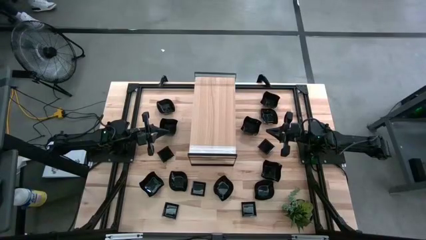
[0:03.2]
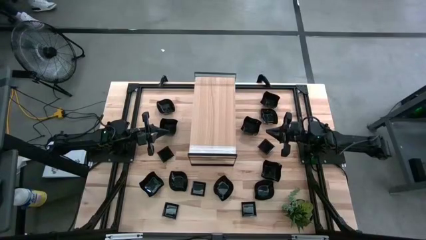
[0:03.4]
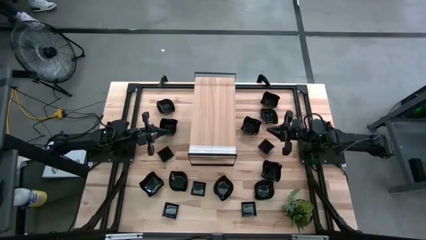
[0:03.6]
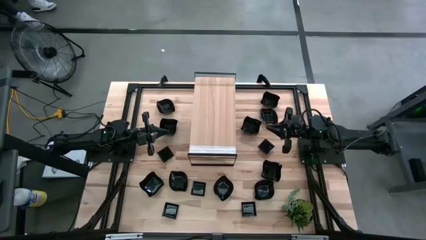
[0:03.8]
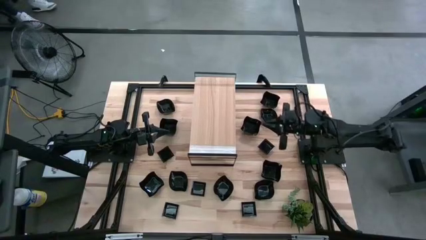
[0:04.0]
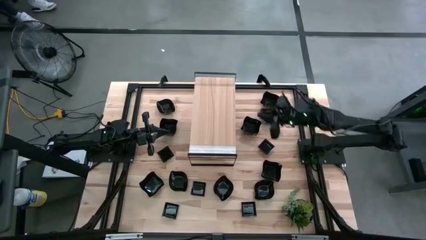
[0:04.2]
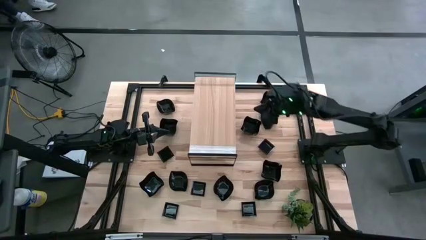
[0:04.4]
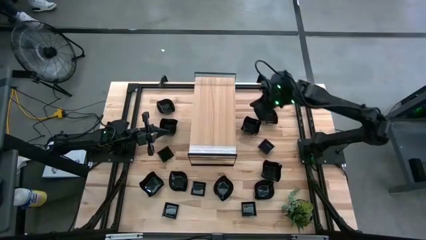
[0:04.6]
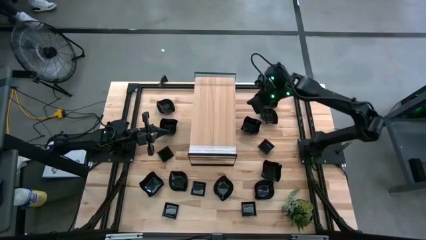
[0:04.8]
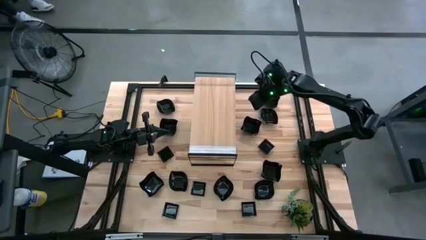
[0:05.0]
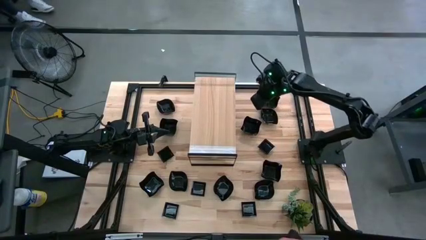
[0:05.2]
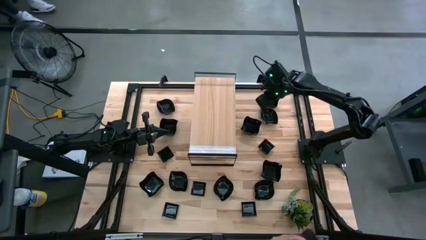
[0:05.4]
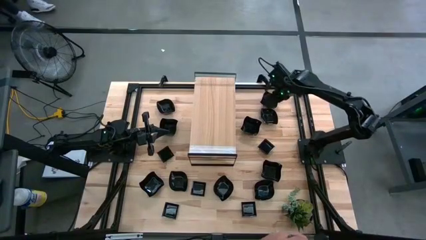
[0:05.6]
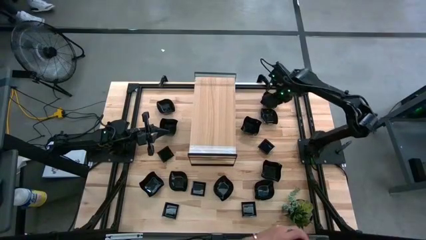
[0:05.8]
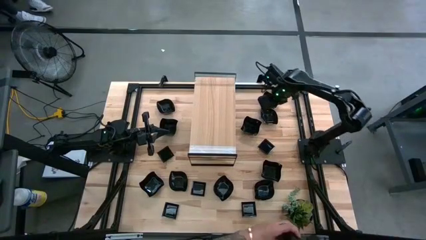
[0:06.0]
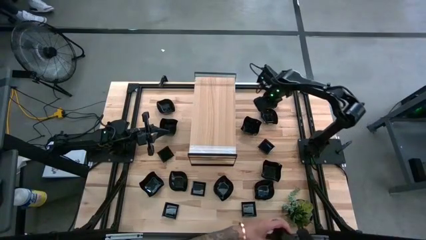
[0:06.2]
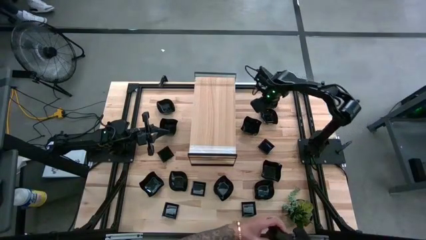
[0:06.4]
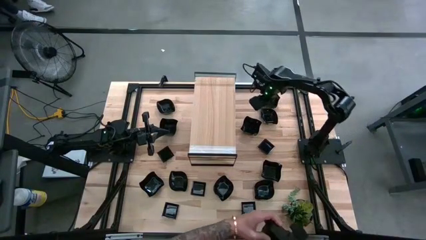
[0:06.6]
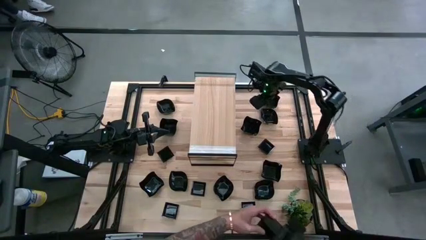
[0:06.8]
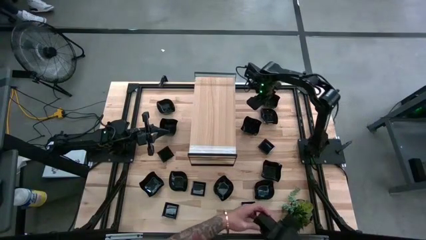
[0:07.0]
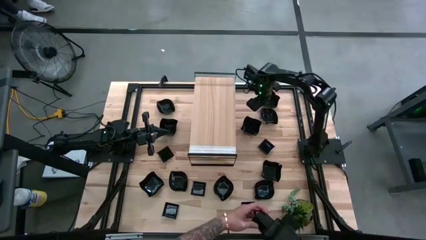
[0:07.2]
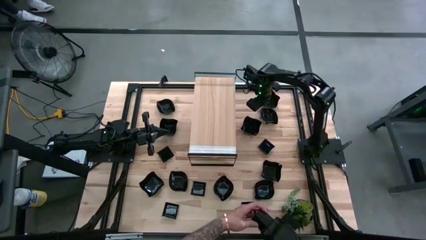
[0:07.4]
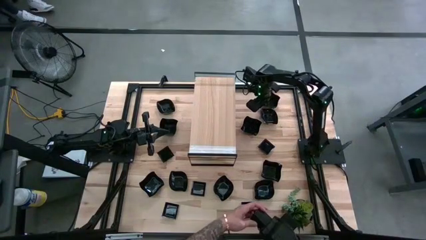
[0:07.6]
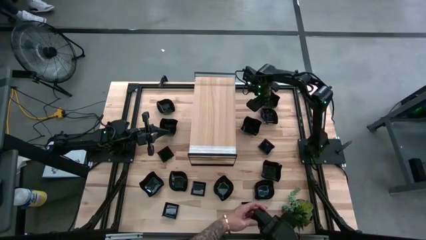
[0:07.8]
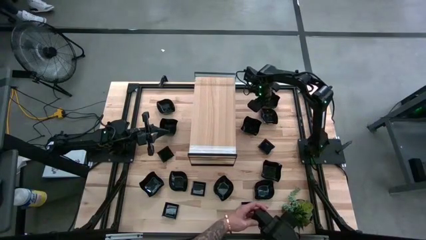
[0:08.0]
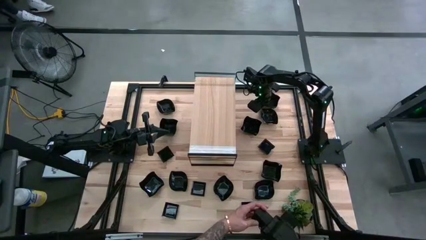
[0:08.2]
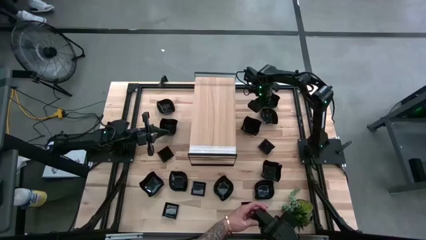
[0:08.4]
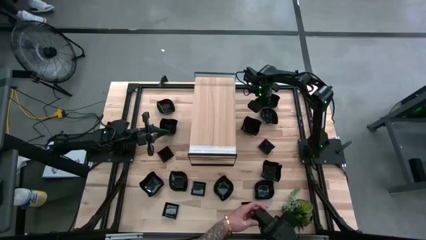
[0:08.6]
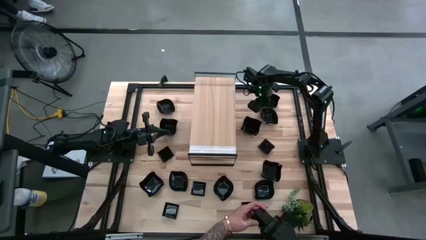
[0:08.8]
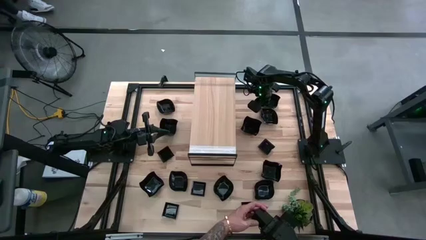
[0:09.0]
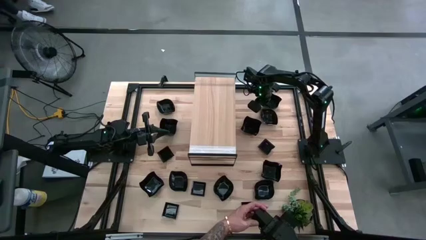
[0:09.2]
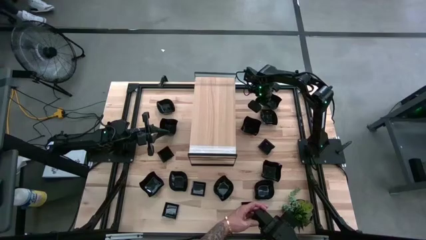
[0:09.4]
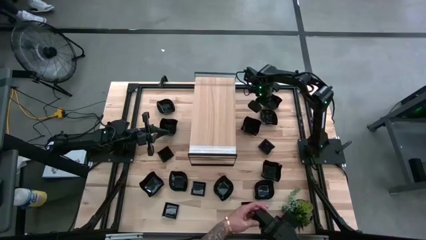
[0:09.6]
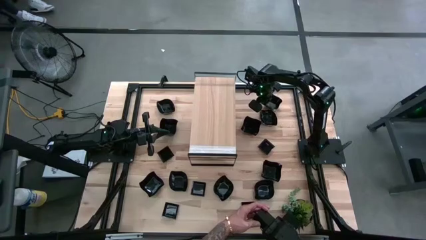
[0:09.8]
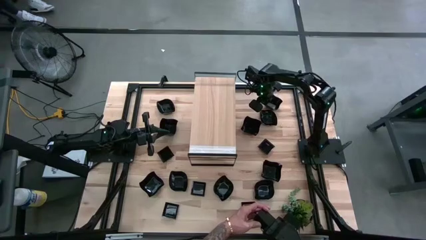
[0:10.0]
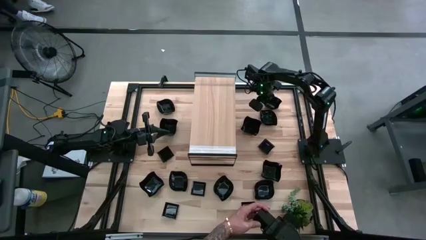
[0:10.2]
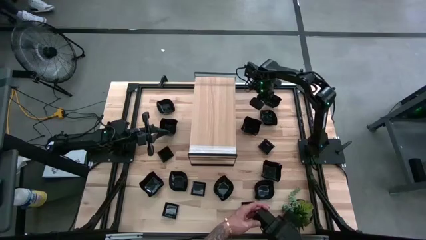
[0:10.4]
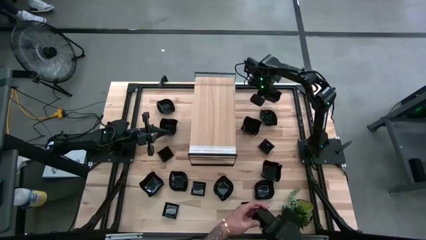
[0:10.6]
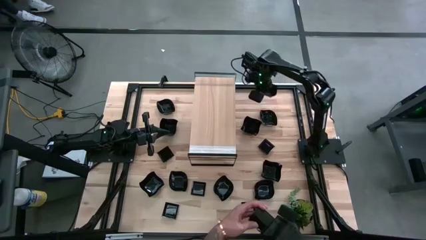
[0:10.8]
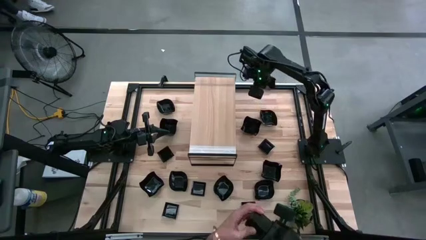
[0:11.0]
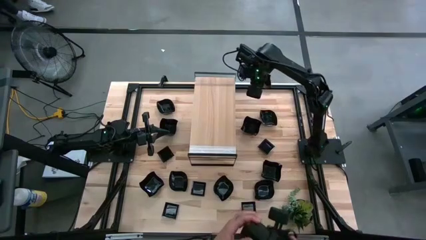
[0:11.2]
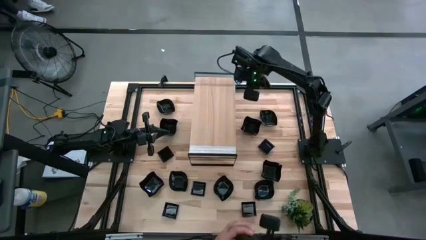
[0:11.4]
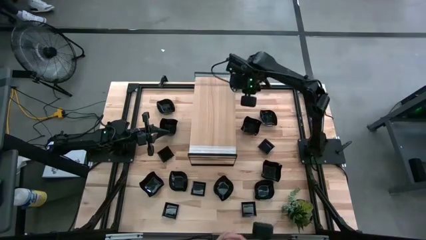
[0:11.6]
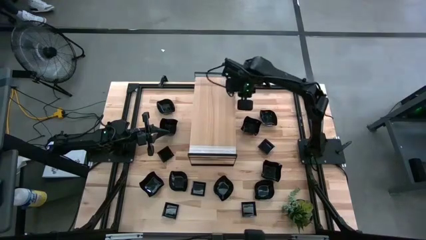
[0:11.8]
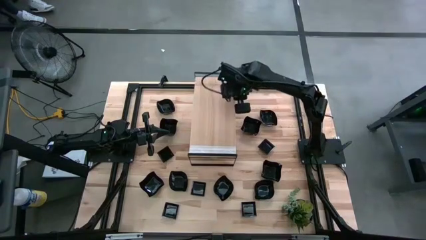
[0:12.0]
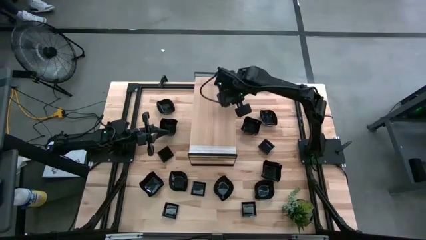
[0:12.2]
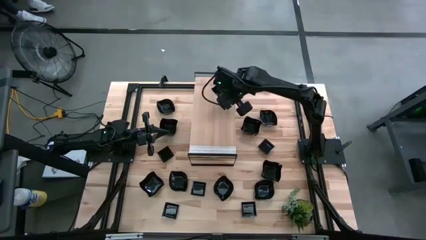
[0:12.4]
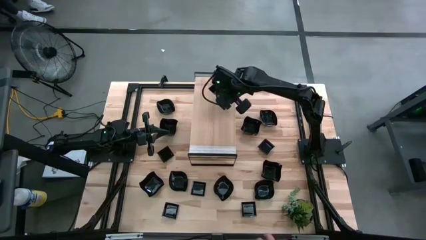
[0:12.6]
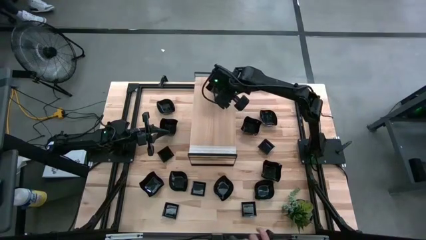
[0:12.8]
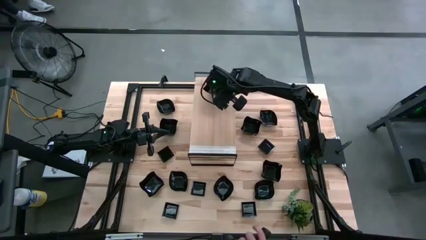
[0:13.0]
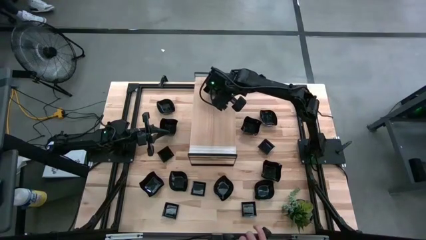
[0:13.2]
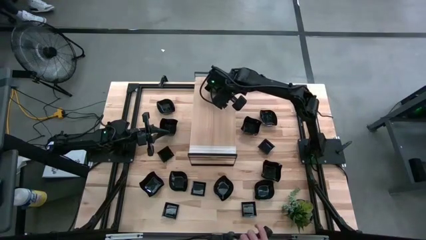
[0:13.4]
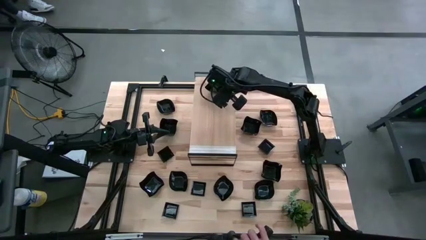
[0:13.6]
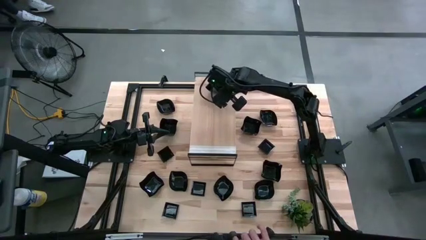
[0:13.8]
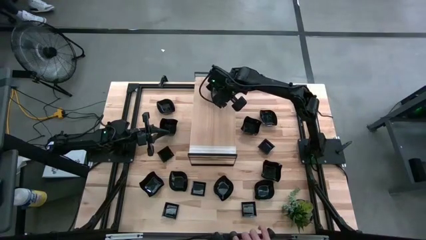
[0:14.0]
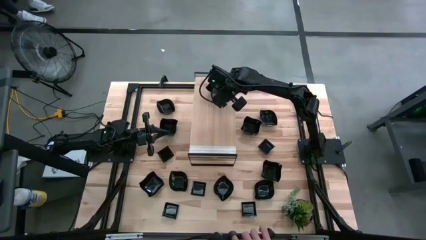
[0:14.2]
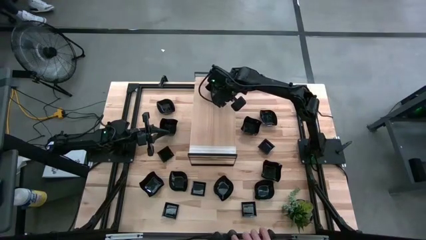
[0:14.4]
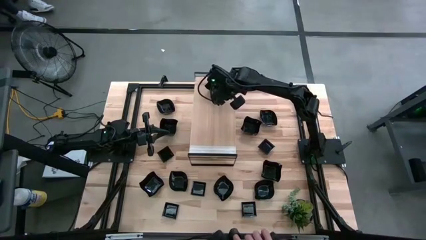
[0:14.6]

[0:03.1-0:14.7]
Task: Pick & Place Mini shaped plates
Put the distorted square plate on the shelf

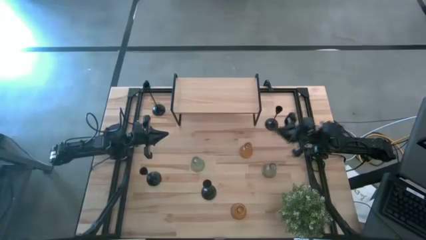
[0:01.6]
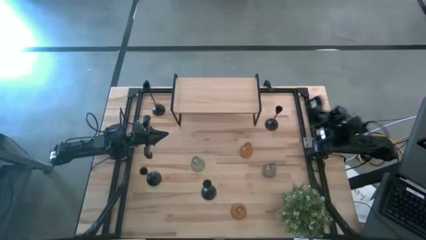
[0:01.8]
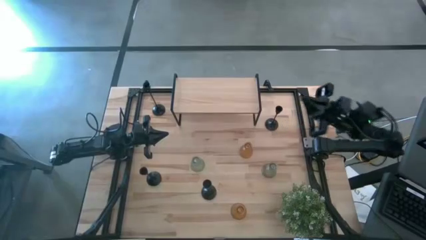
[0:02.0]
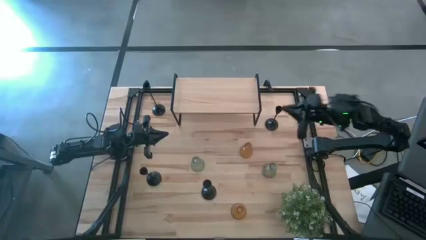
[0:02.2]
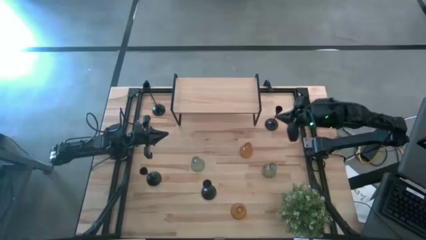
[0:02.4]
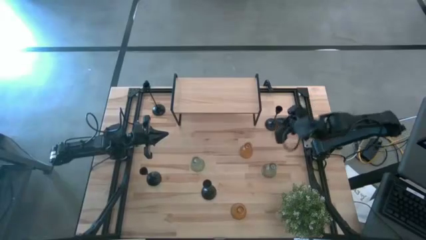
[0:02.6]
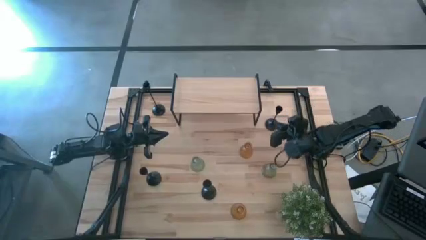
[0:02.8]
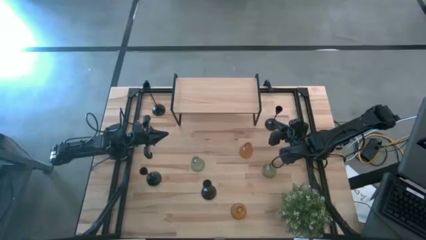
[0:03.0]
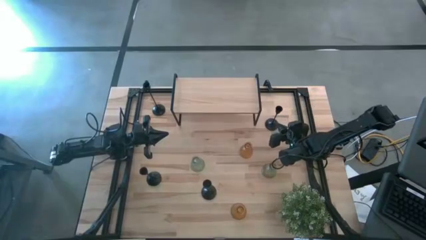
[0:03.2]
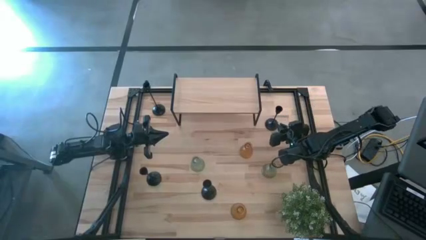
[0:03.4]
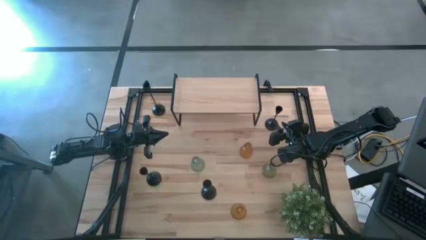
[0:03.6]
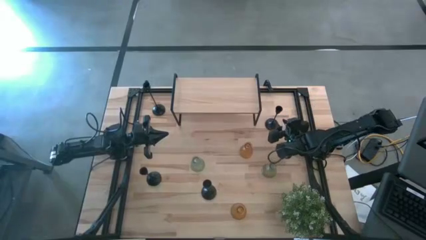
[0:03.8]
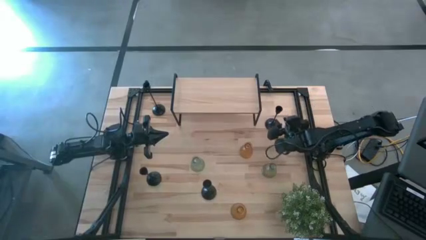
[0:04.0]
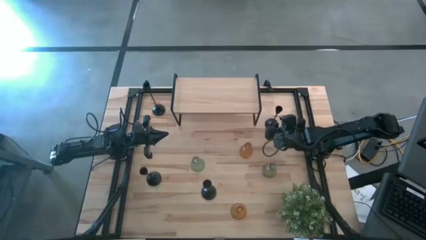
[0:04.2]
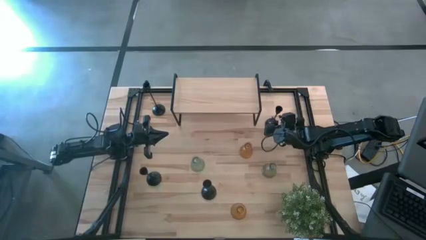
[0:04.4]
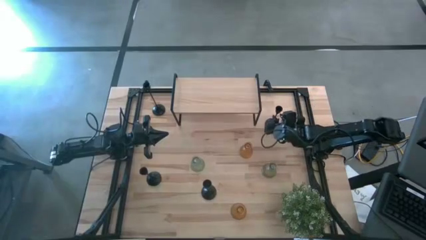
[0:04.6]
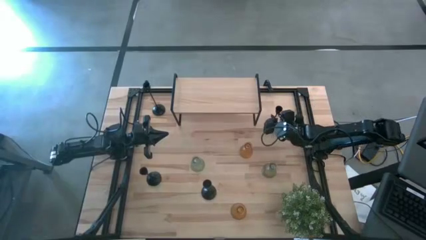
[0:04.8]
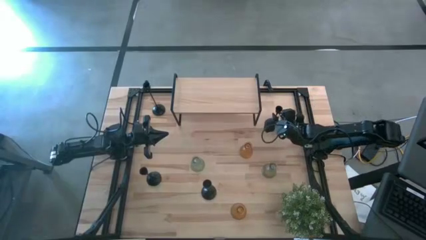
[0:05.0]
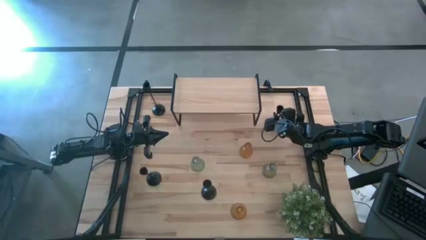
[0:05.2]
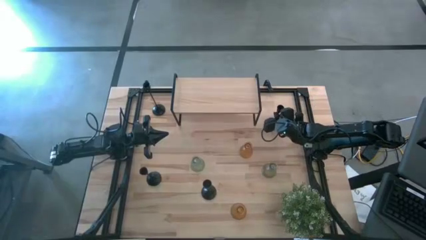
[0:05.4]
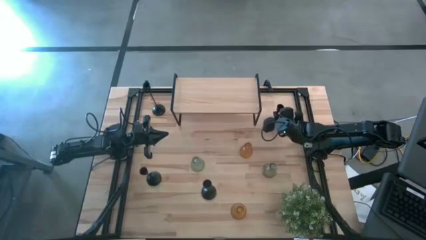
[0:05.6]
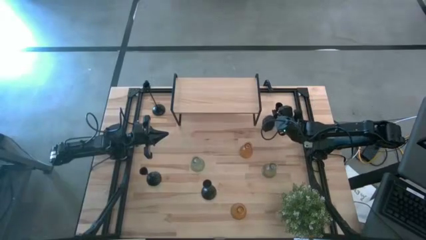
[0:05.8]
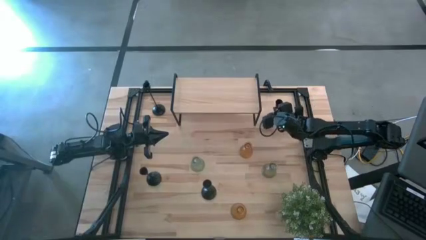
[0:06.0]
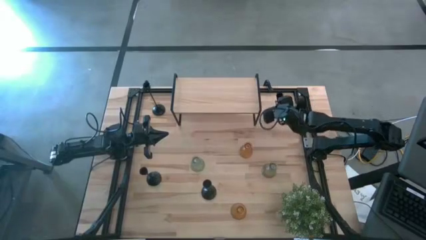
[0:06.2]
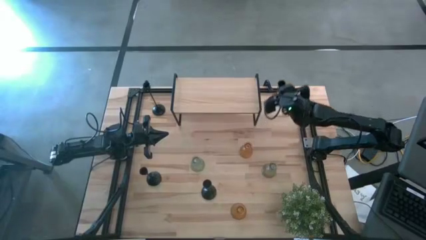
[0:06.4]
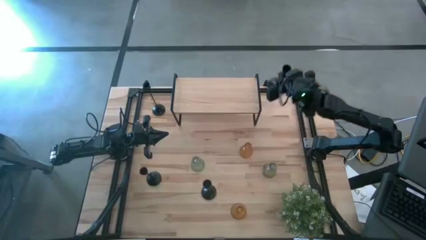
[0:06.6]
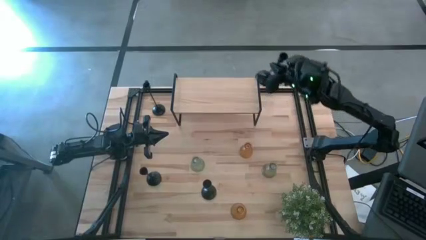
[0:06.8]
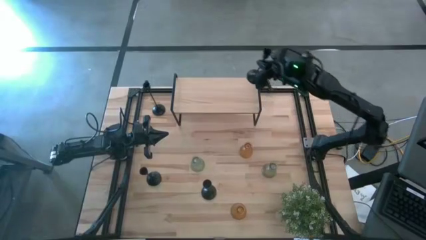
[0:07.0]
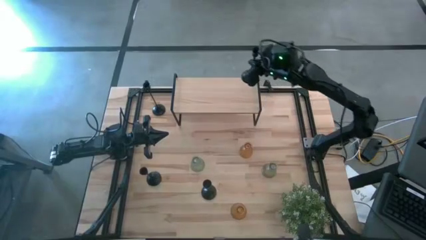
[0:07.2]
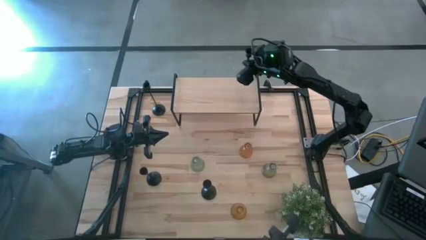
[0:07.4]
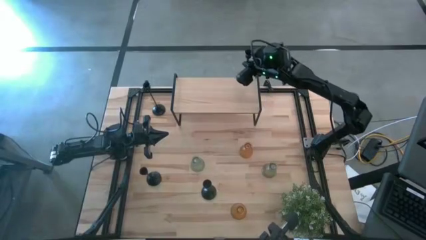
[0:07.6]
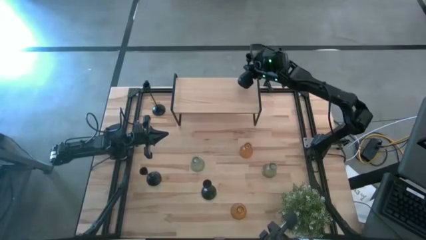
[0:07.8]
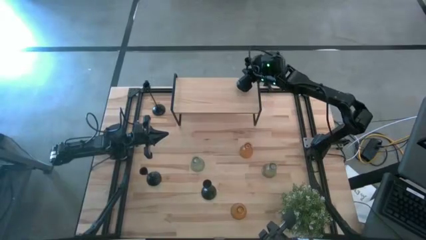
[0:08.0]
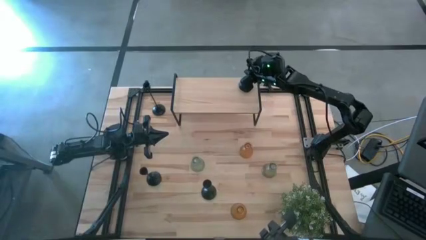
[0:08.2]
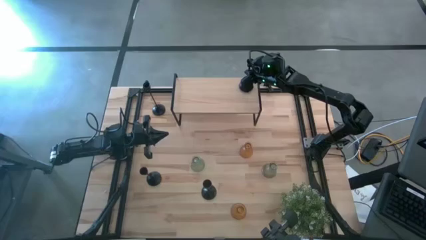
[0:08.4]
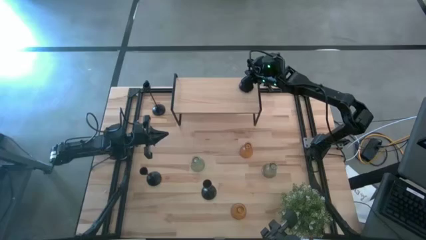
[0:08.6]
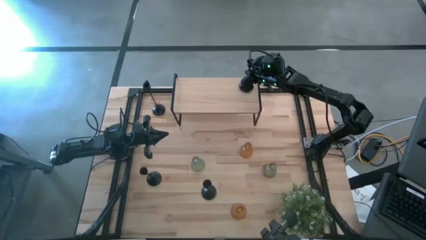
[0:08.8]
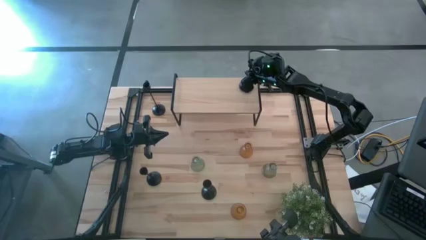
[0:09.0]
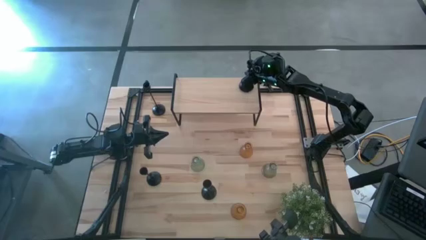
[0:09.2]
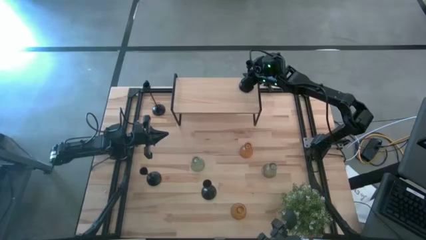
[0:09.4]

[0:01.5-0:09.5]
Task: Pick & Place candle stick holders
Put the black candle holder on the shelf
